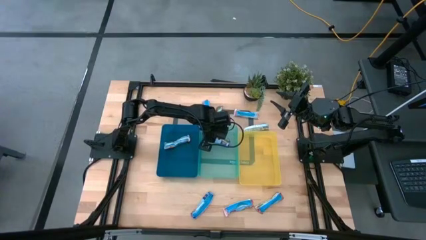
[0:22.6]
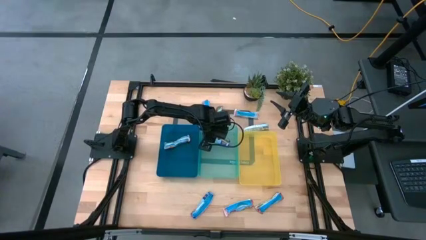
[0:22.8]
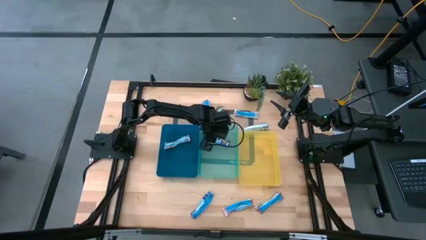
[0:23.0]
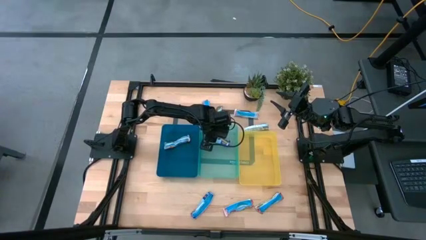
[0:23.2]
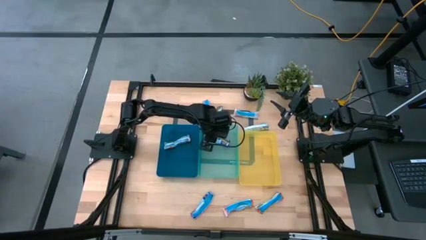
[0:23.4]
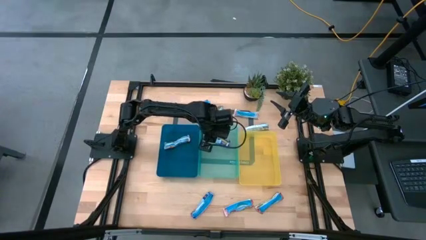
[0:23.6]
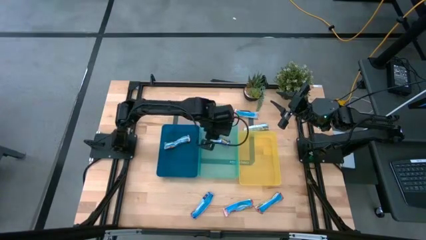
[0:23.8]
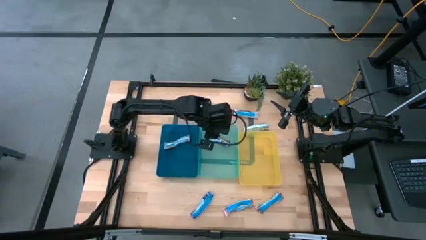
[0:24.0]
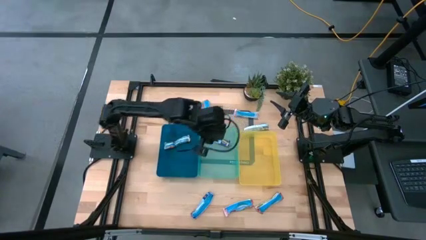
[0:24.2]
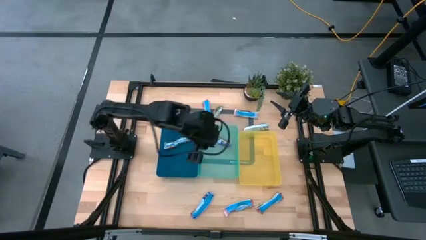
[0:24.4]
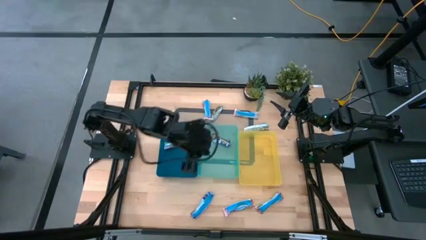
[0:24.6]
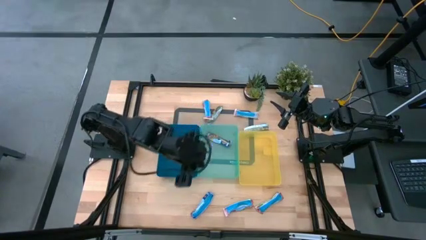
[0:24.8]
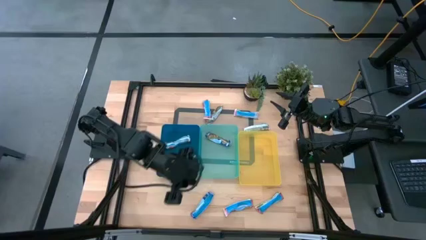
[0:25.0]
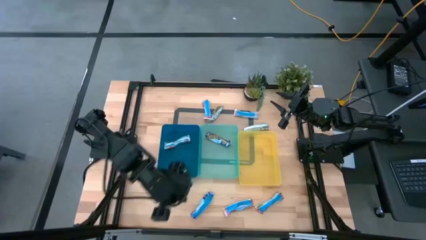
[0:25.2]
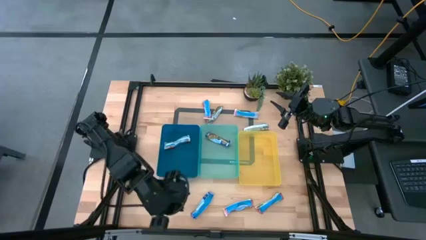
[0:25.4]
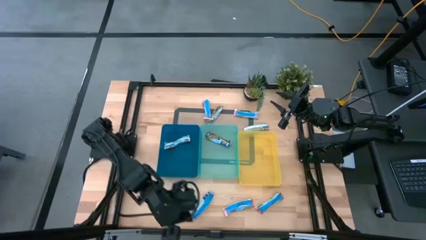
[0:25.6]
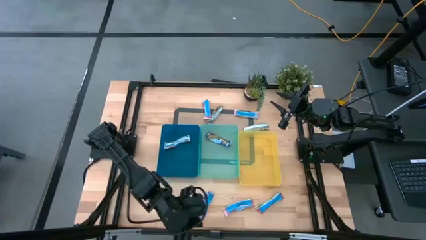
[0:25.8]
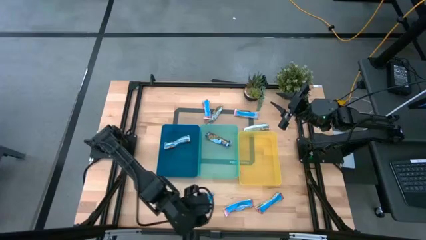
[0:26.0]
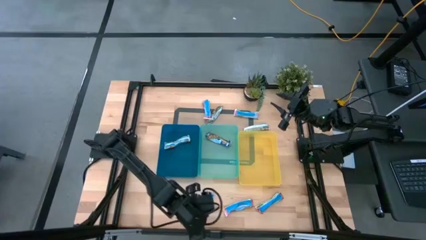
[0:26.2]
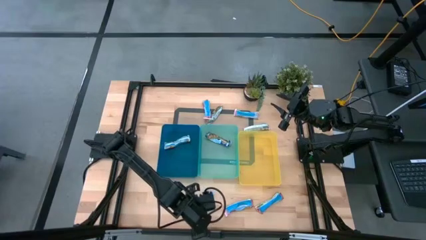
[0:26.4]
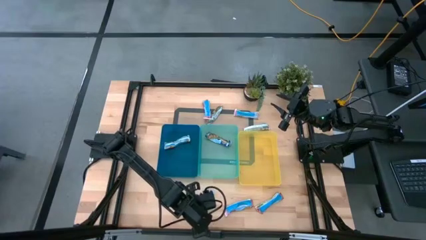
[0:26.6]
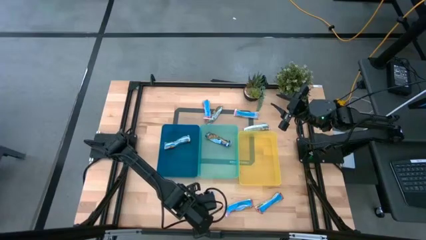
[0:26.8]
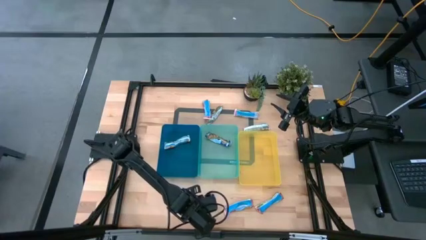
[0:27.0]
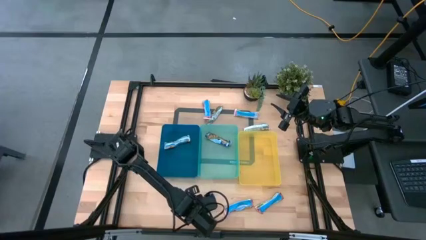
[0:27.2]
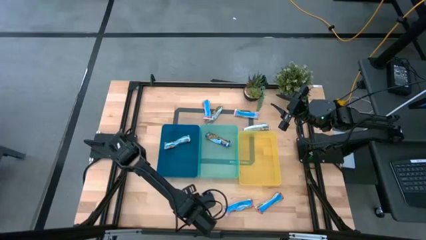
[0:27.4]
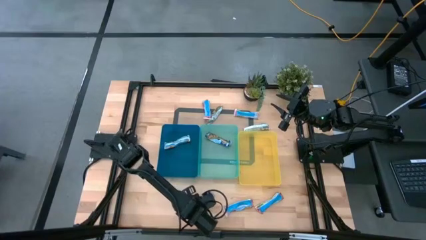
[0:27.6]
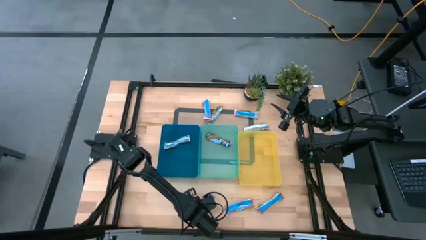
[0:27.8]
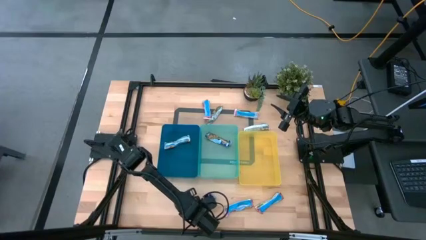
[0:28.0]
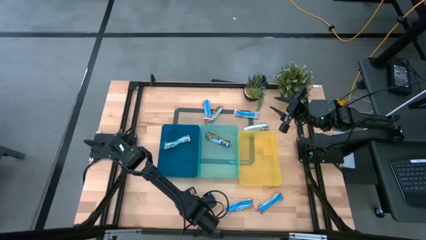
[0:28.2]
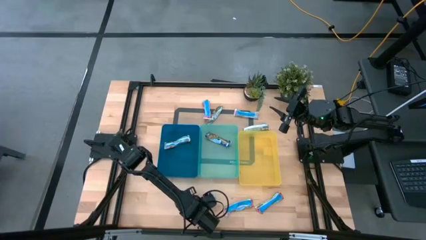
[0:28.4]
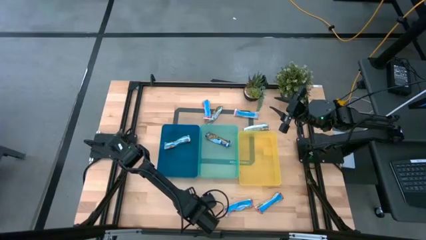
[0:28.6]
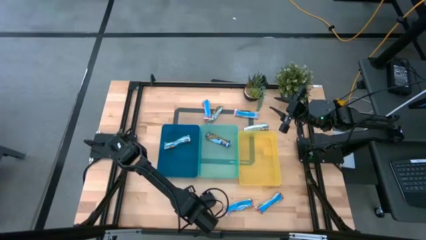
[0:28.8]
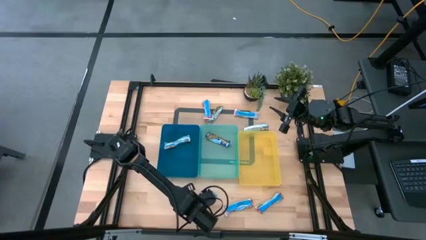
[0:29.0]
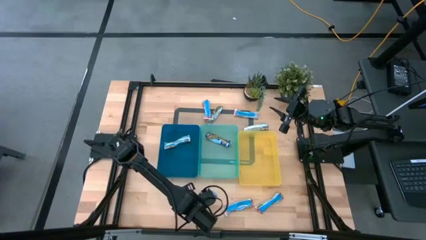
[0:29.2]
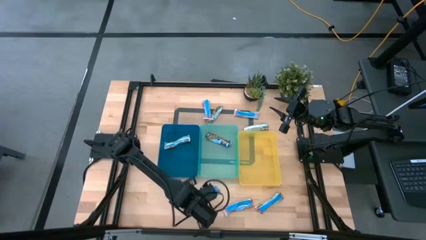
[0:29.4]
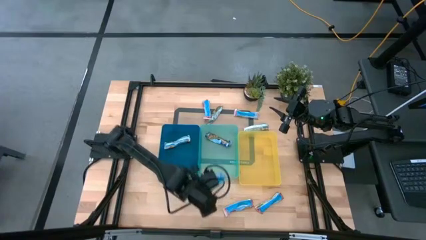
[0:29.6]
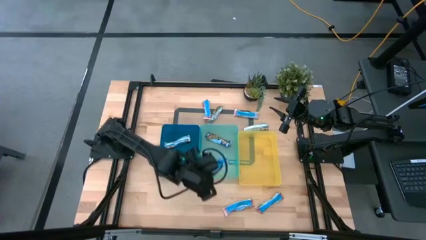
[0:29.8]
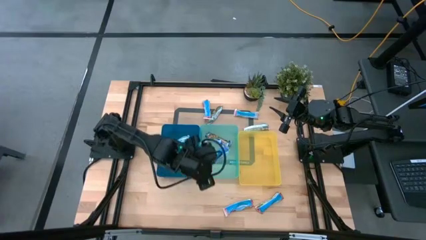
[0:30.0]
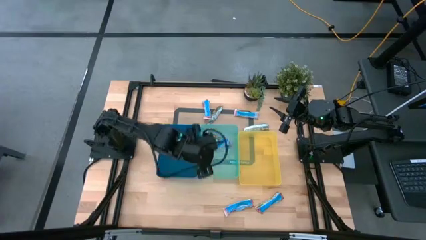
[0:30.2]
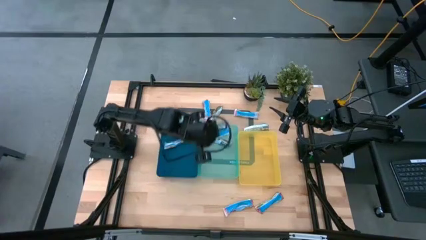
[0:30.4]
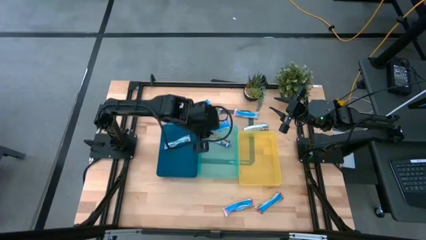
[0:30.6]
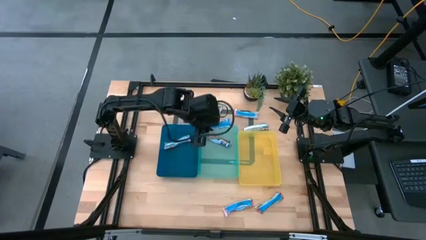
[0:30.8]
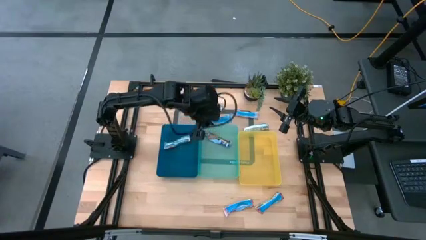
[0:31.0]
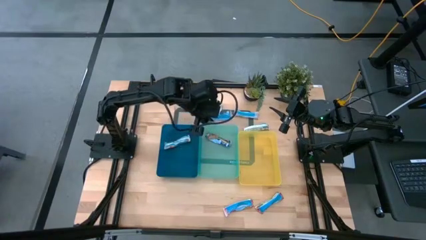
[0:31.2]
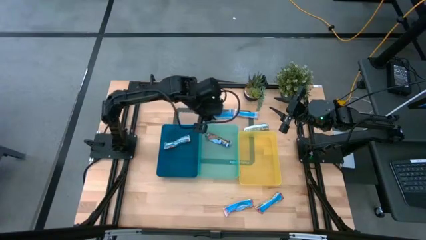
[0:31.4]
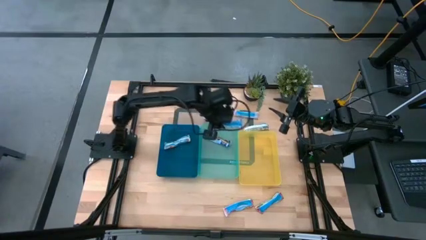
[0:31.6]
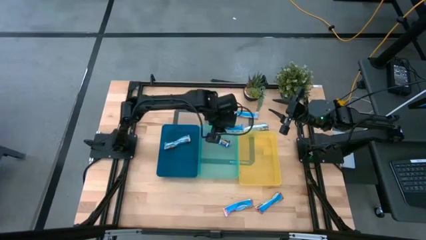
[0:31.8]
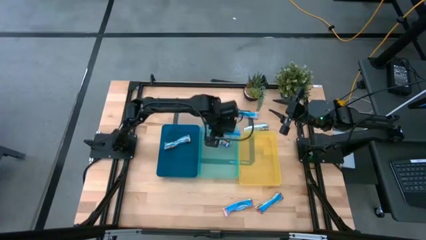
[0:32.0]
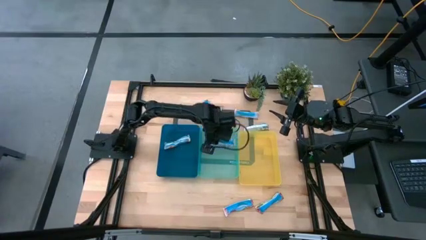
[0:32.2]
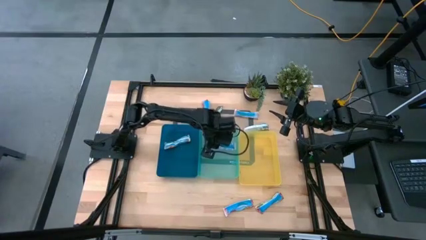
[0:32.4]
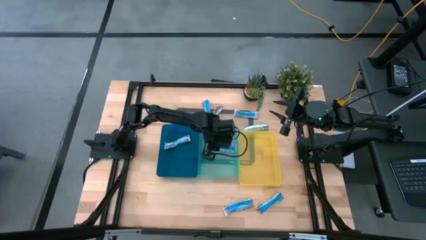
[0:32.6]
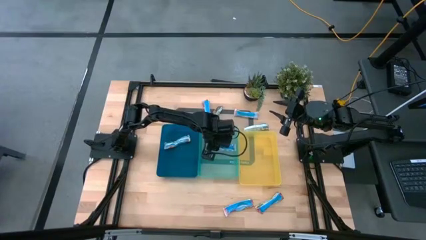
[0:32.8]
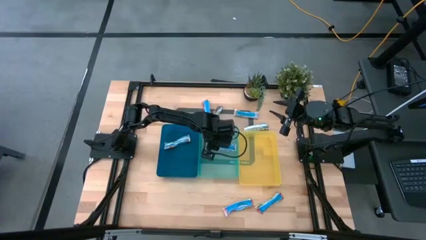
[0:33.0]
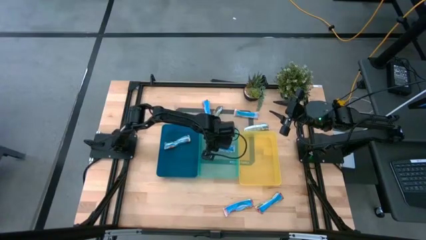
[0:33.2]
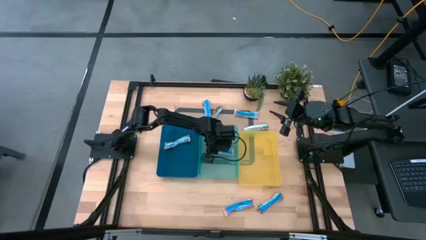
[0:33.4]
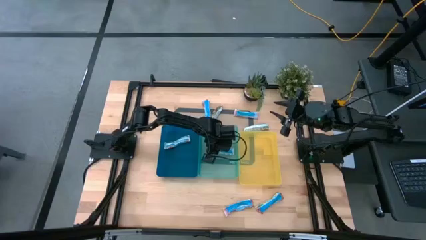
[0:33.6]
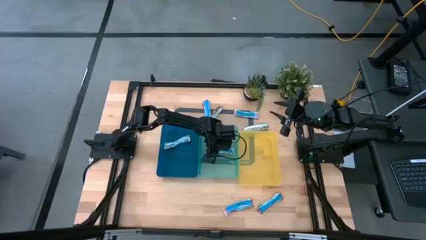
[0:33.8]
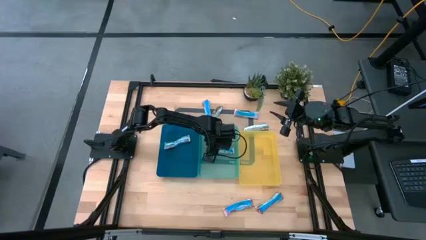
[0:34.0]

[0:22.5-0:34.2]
Task: Pick and place Granola Bars by type
Put the blue granola bar into the green bin

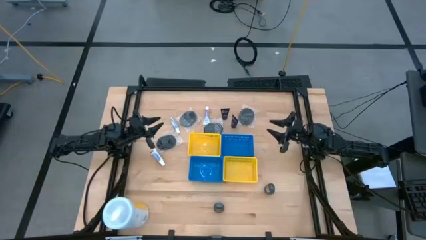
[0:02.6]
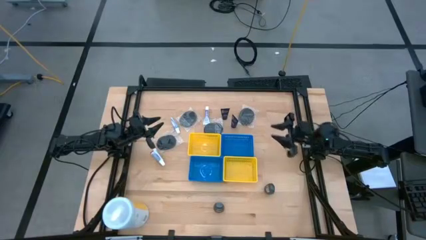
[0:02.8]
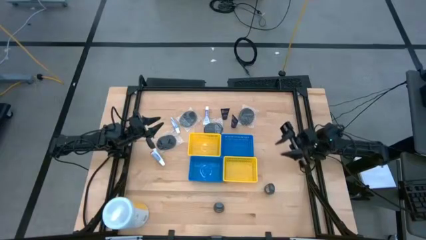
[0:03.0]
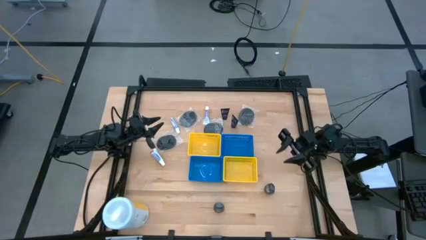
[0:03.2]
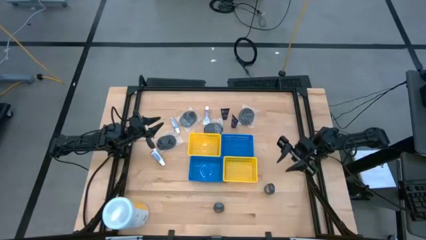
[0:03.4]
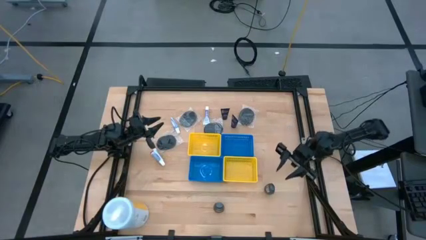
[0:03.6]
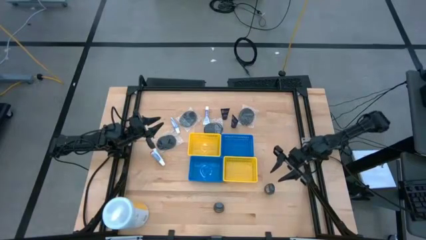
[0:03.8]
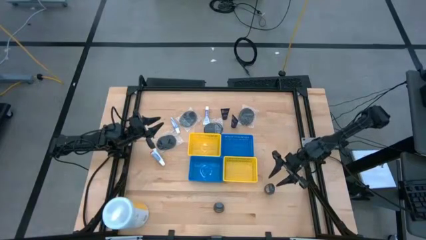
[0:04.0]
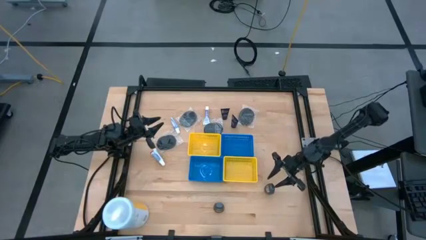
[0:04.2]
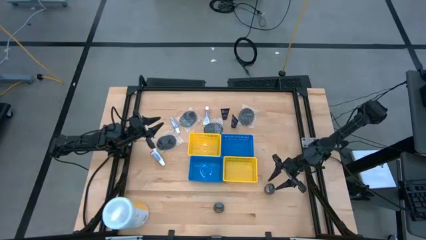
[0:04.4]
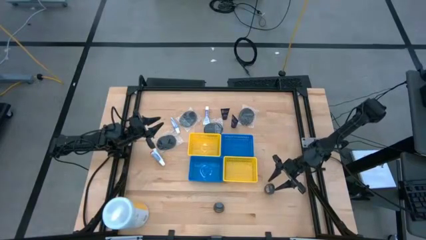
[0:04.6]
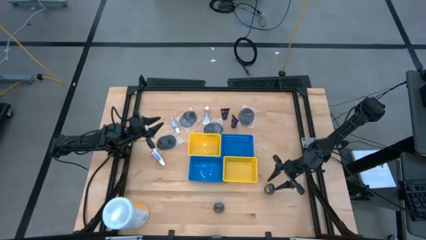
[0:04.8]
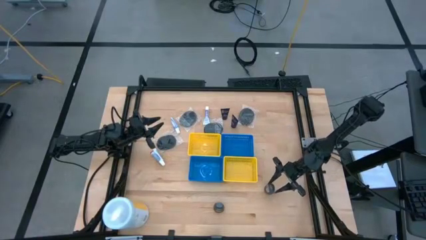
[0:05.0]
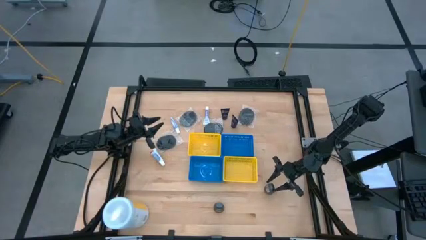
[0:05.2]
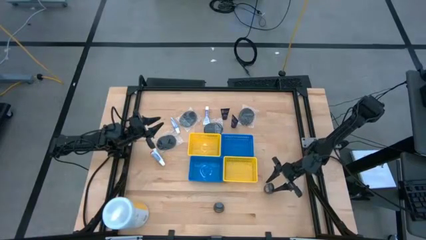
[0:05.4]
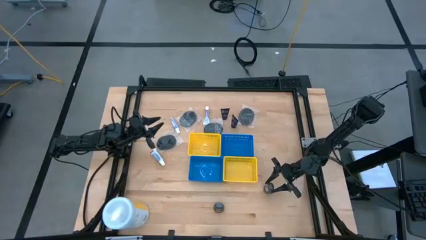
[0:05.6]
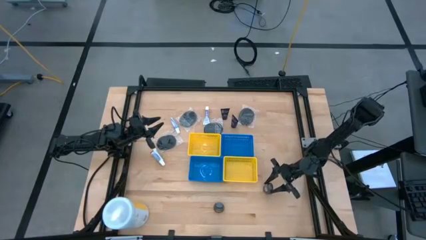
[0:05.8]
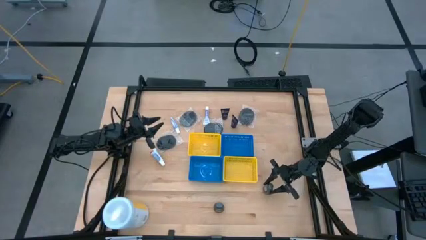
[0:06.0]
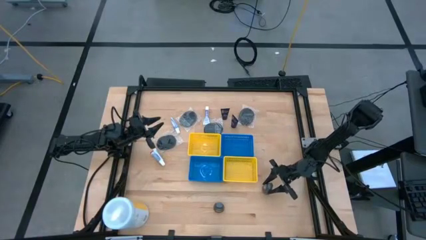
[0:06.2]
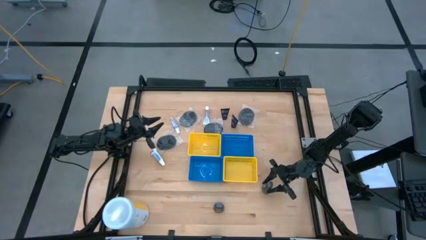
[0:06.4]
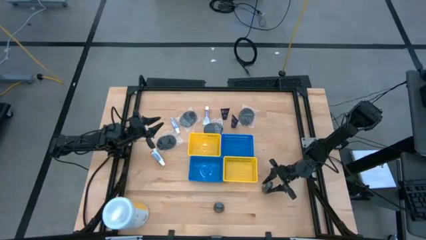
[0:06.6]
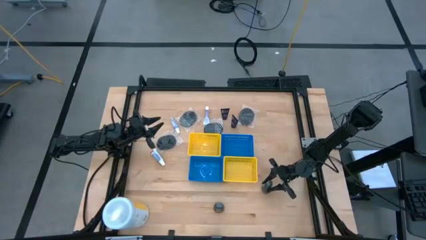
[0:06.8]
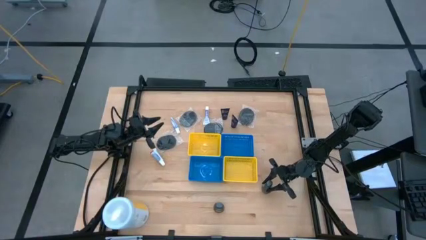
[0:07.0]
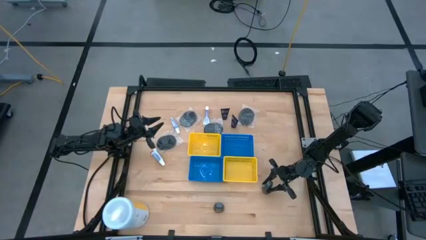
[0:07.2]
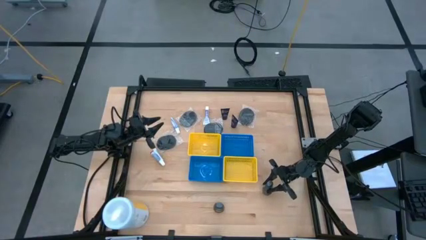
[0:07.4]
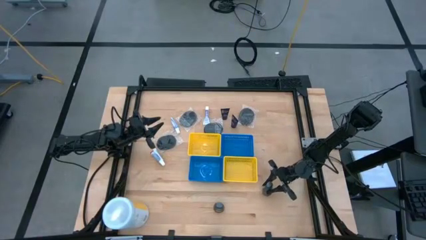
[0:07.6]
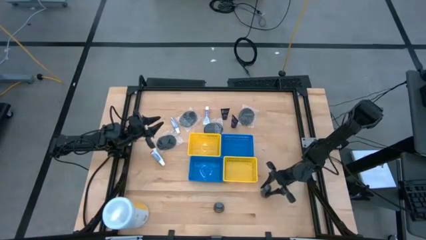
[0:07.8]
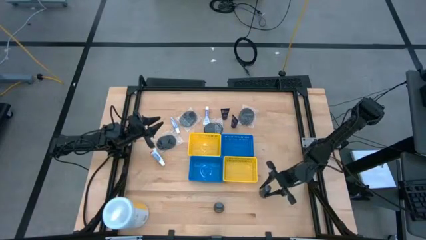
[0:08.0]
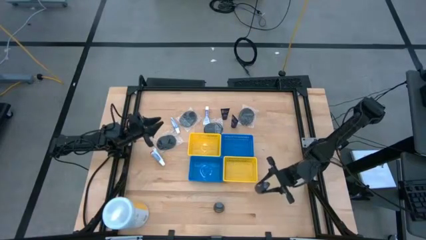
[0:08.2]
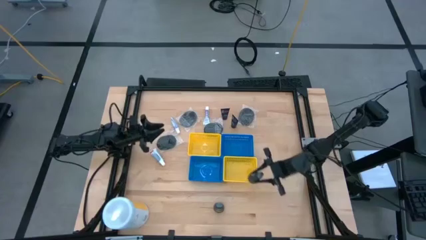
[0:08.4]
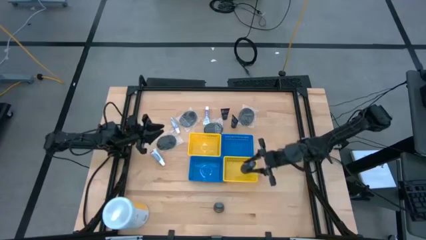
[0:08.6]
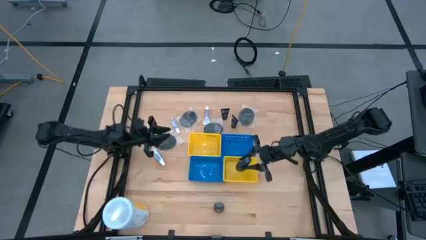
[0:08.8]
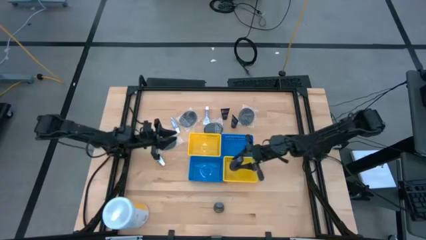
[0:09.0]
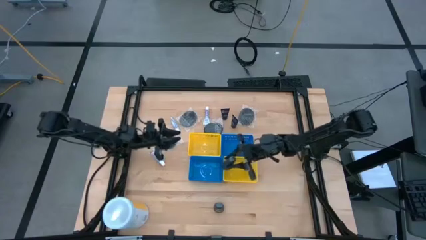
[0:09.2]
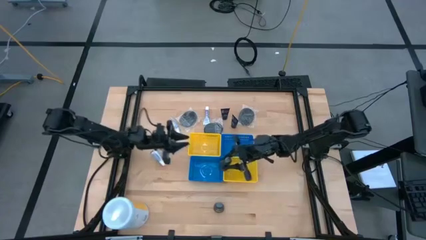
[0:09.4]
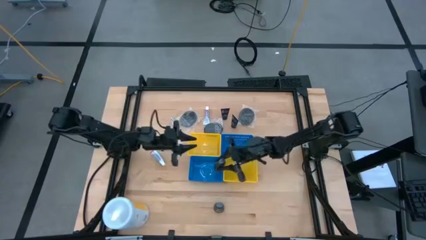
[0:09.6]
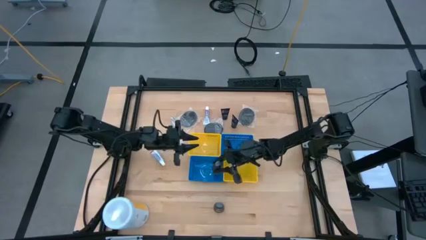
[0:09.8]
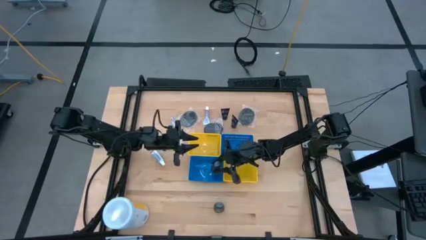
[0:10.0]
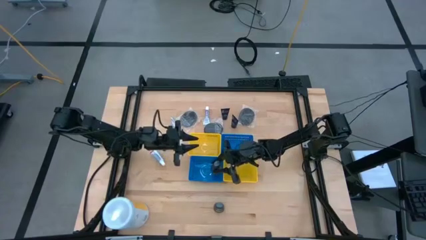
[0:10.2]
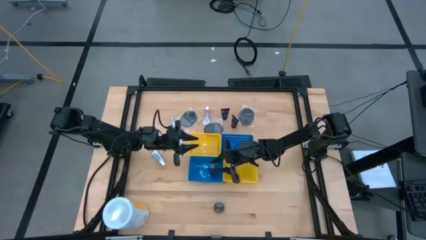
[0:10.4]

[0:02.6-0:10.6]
Task: Pick & Place Travel size toiletries
Put the gray deodorant into the left blue bin
